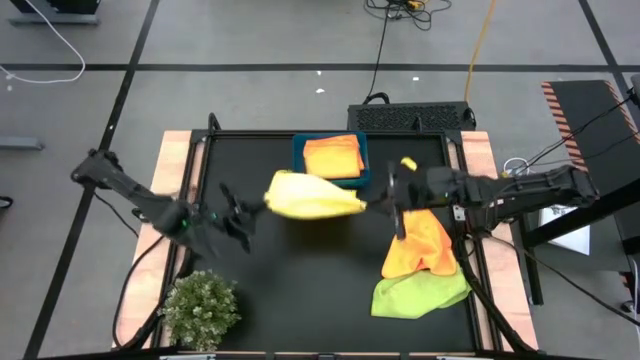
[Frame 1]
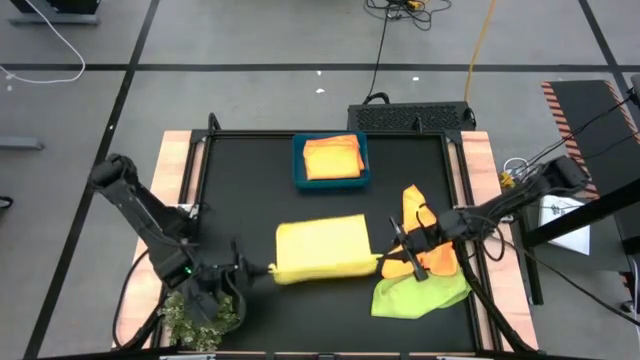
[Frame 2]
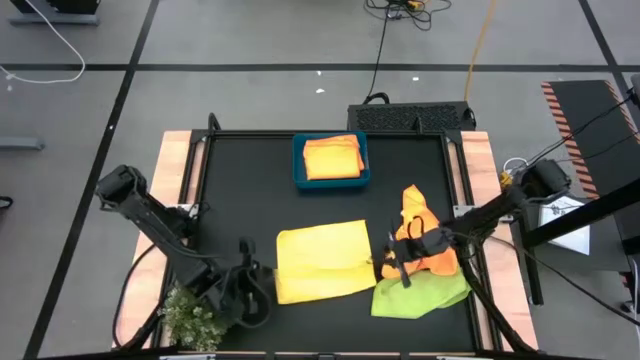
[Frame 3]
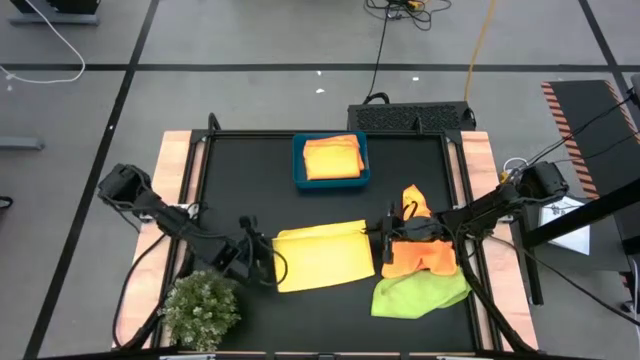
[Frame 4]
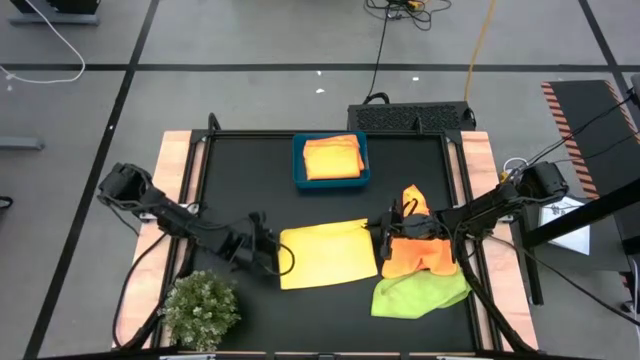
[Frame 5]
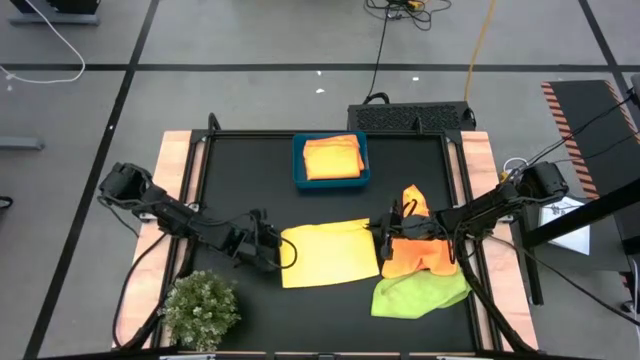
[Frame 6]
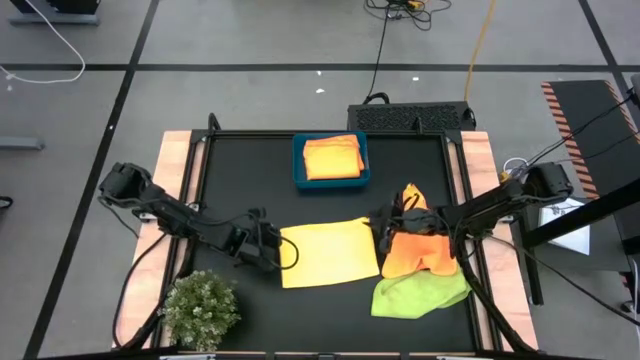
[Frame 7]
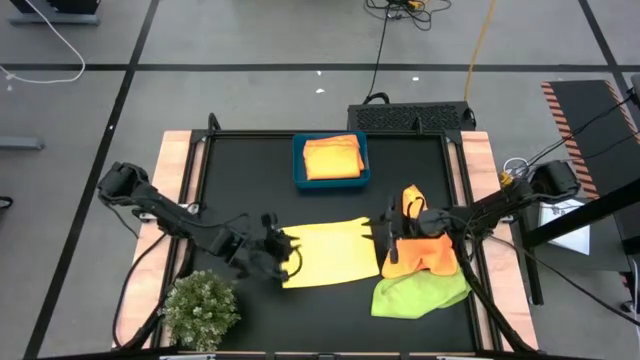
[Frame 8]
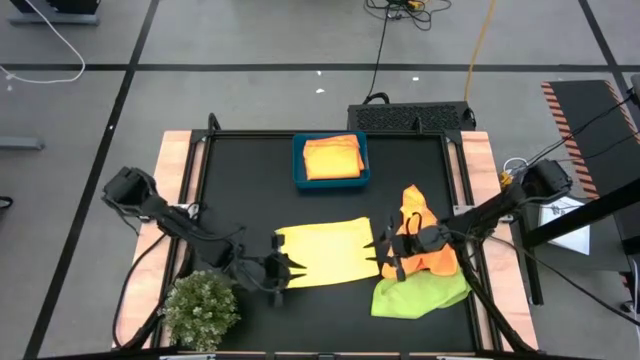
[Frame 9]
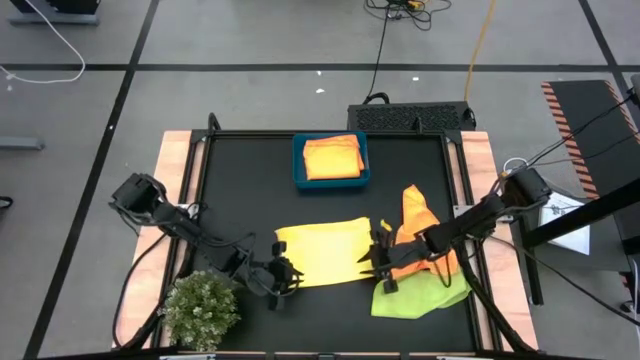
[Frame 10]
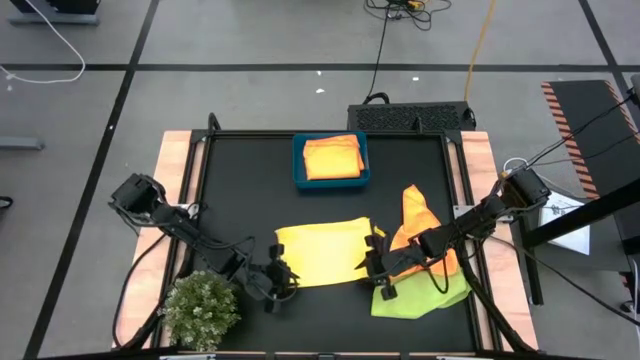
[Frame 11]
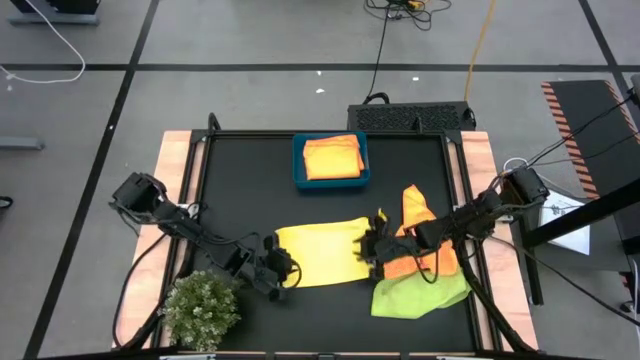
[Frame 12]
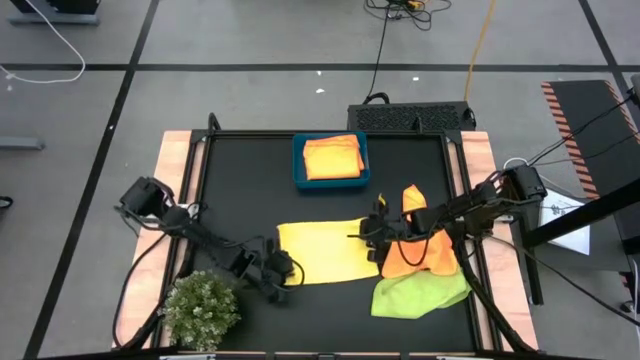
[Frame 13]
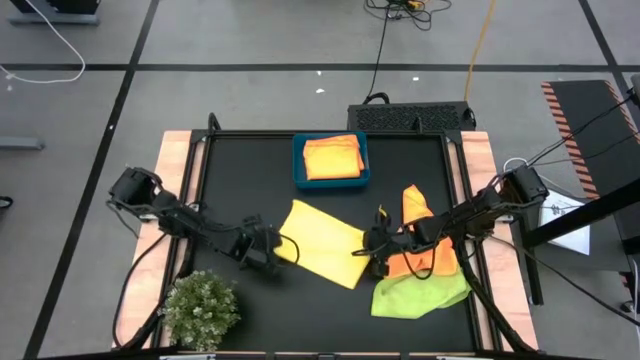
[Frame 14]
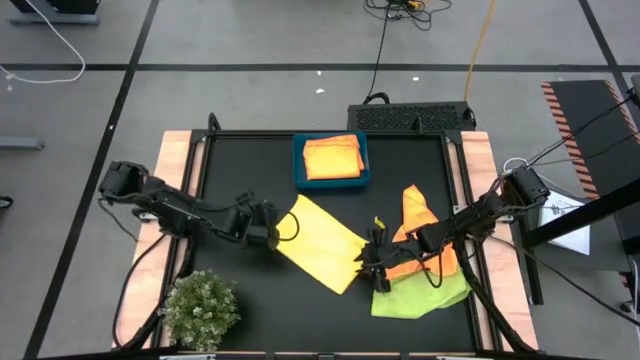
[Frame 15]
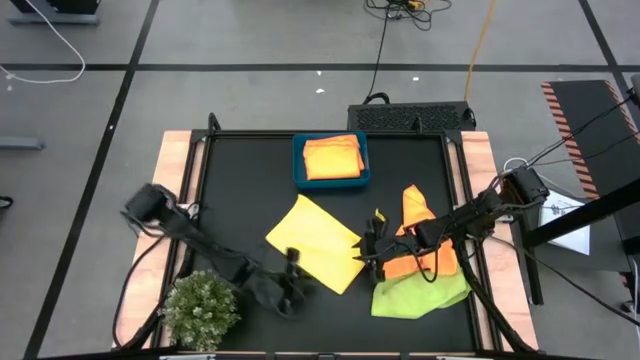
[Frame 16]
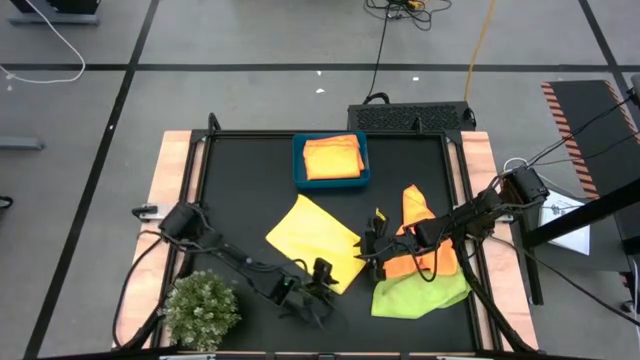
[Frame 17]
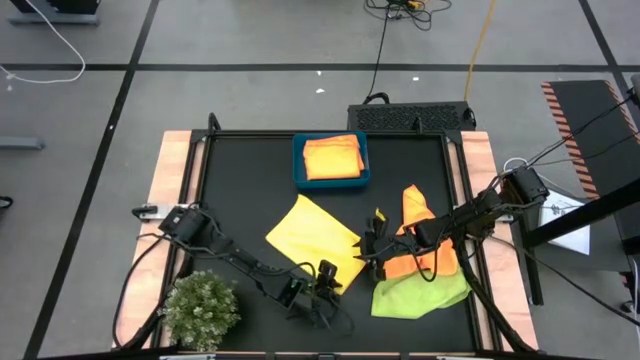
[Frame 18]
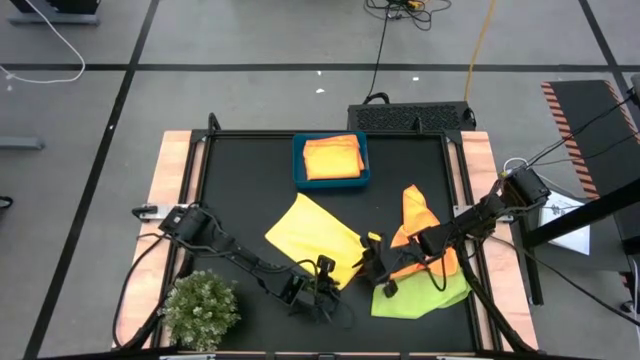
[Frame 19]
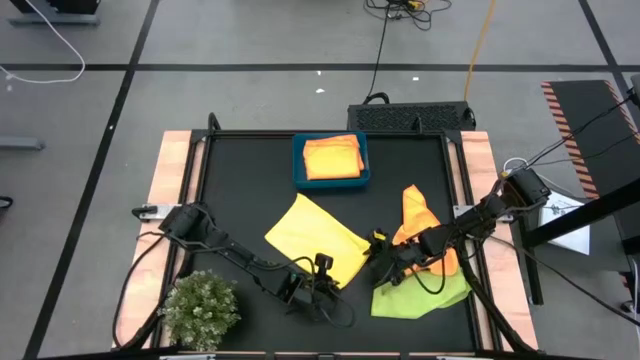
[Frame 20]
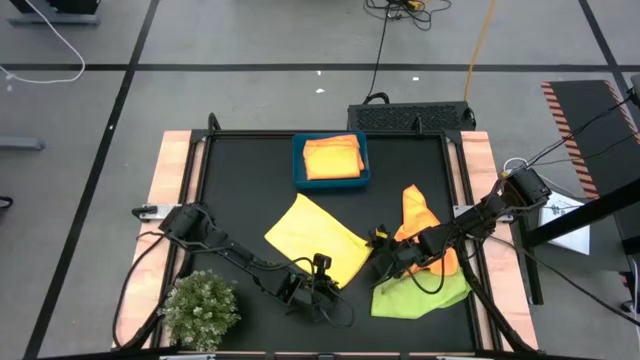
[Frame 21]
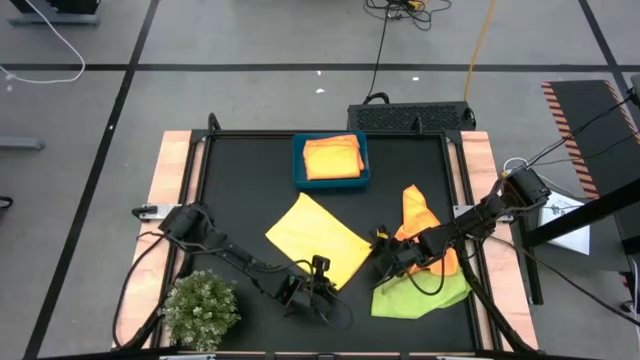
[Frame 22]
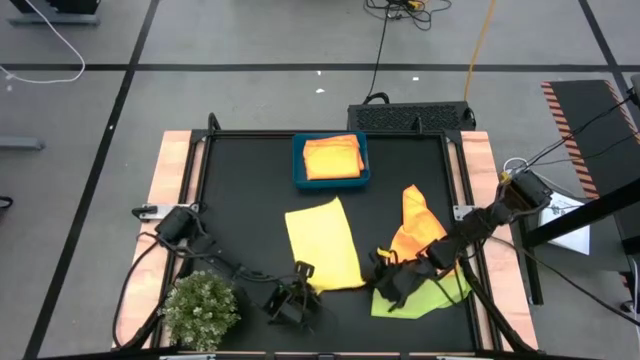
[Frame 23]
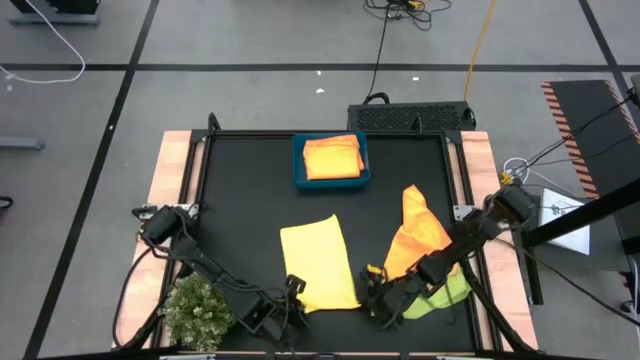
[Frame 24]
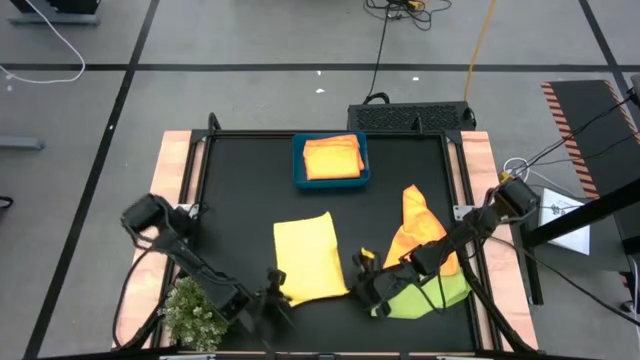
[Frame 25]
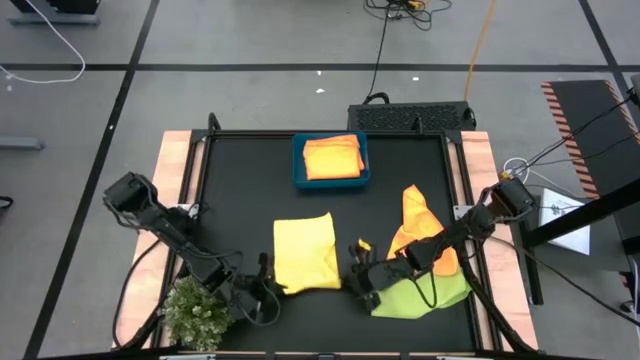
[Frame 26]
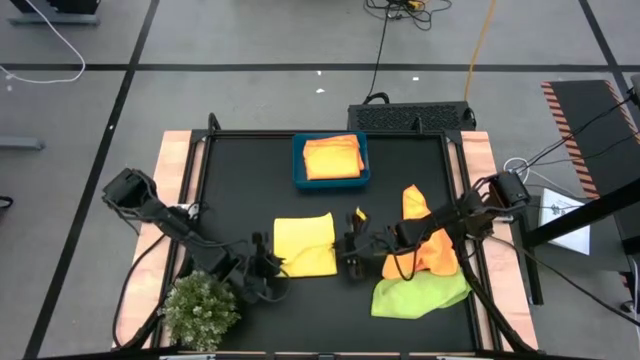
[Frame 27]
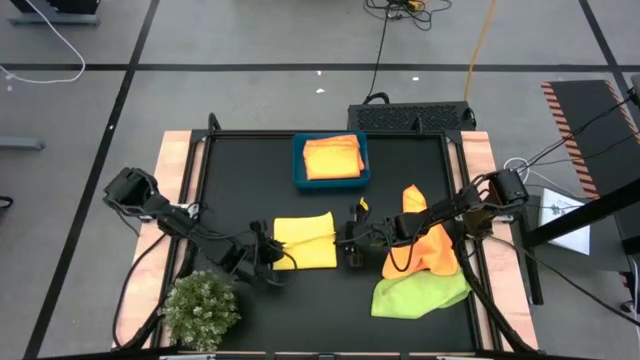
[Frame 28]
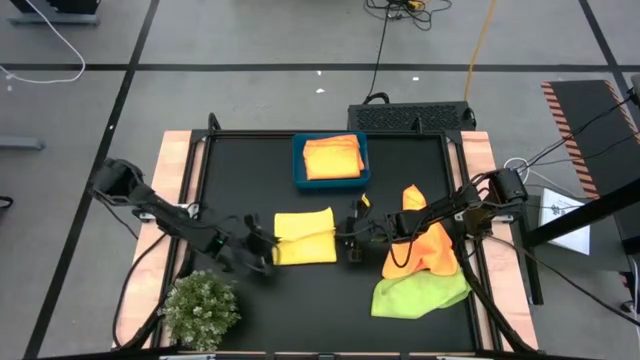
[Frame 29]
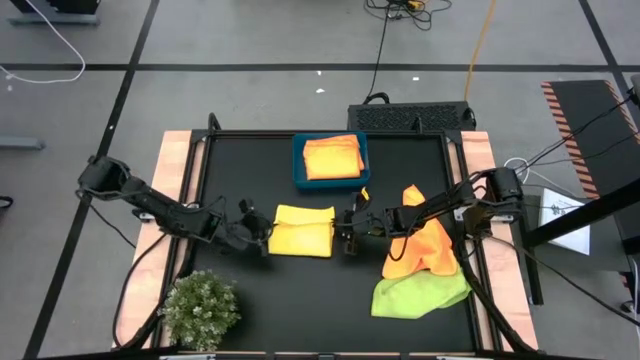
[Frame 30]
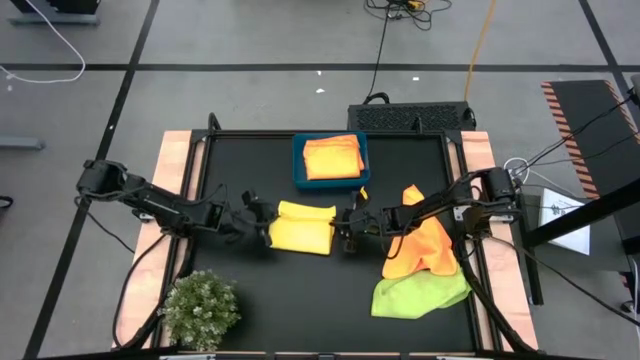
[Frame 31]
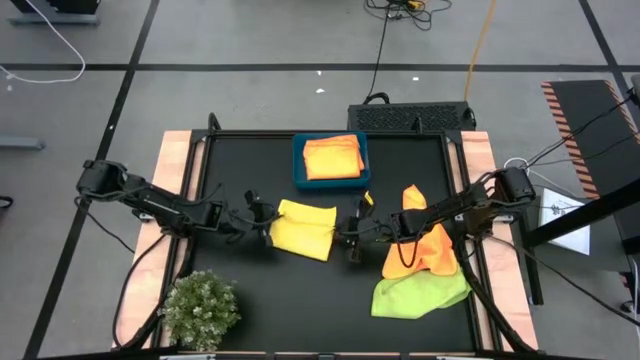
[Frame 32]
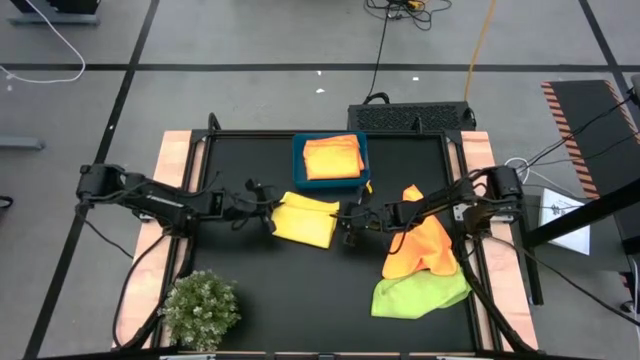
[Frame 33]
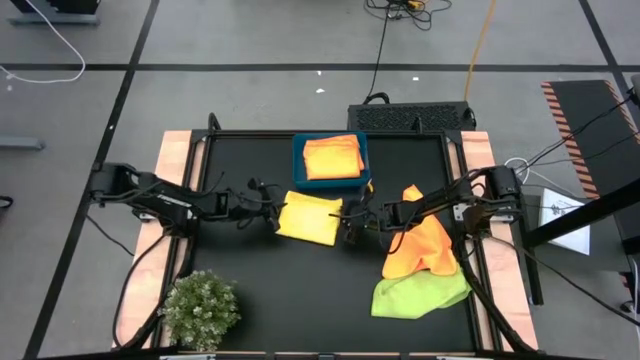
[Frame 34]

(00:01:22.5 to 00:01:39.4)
Task: Fold microfiber towels
Fold the yellow microfiber towel

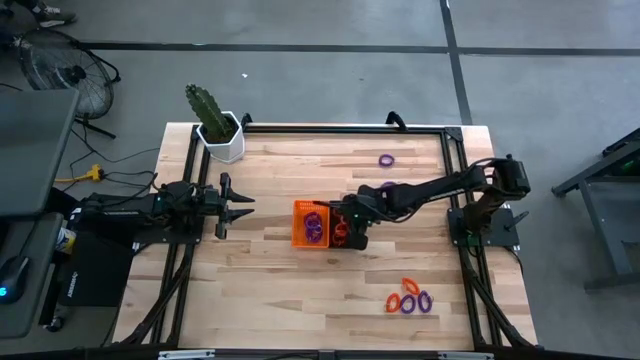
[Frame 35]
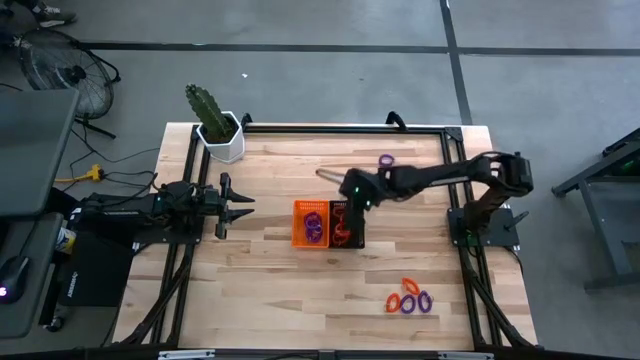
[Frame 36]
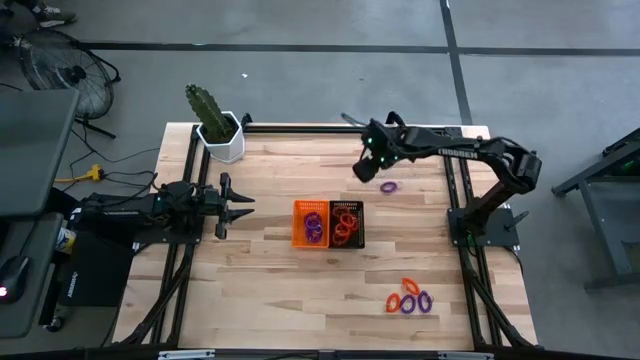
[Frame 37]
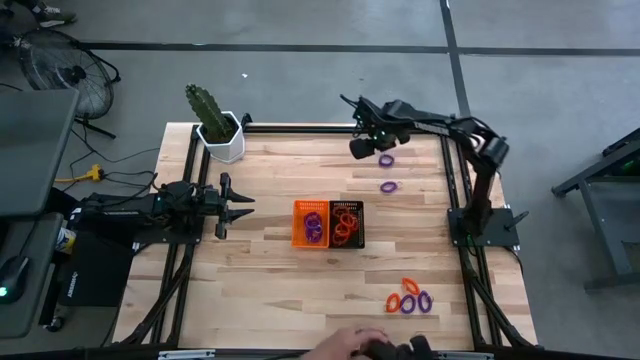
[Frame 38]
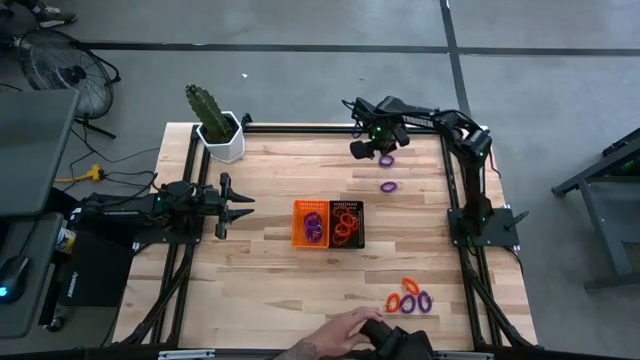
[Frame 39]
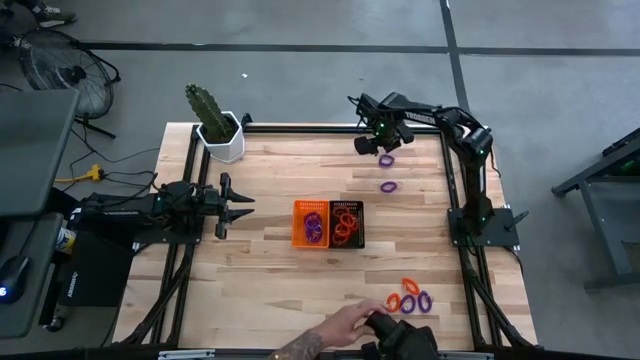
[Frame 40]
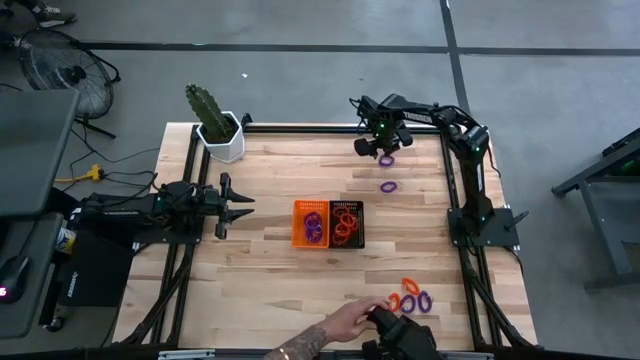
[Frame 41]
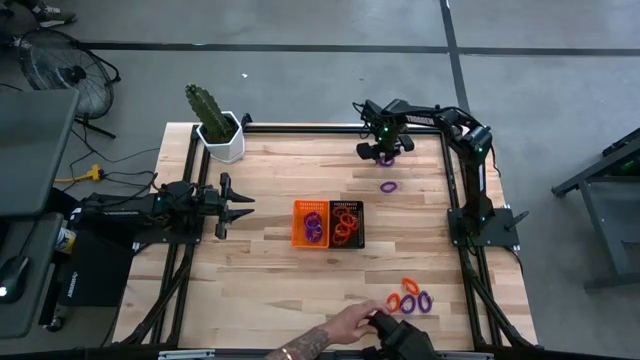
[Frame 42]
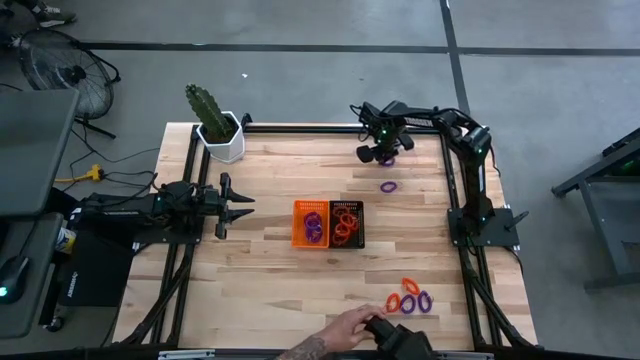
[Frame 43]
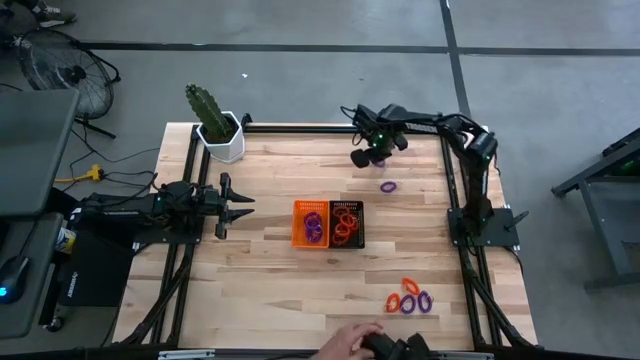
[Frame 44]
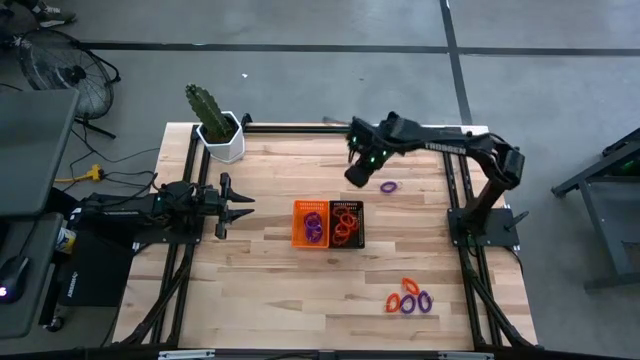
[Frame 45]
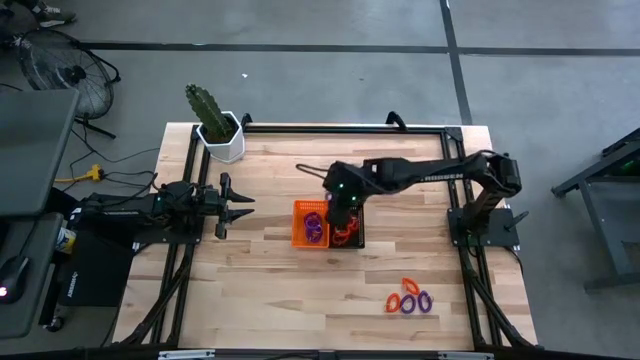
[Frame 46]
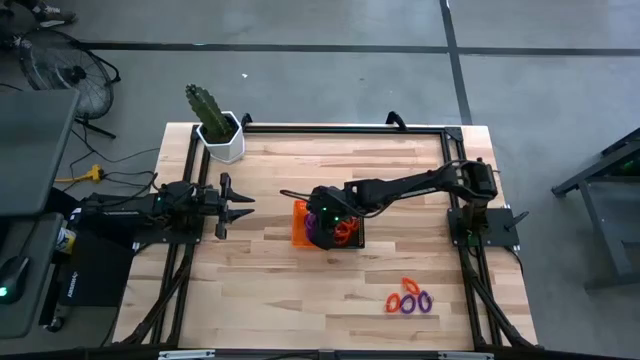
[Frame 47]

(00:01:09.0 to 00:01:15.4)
Task: Sort spring keychains
Put the violet spring keychain into the orange bin
